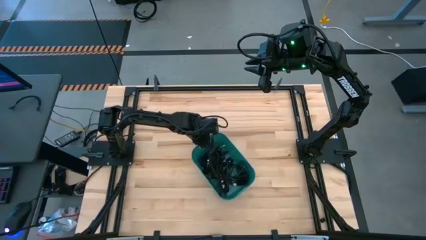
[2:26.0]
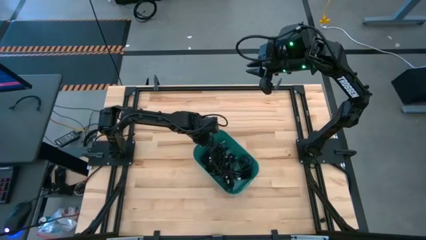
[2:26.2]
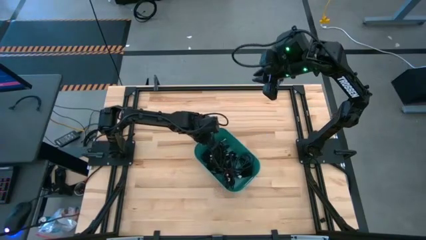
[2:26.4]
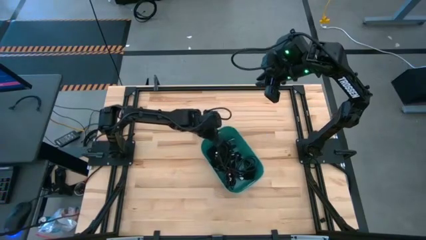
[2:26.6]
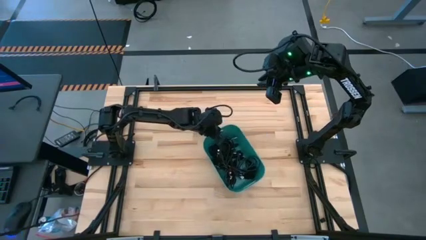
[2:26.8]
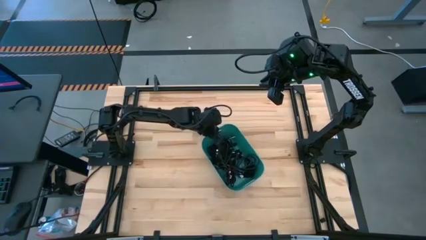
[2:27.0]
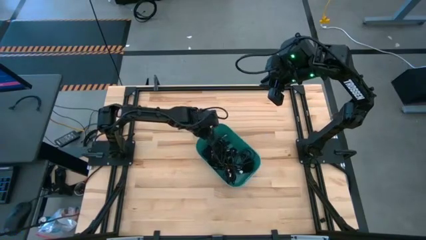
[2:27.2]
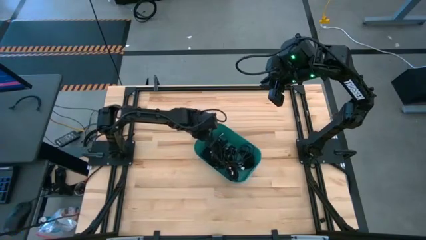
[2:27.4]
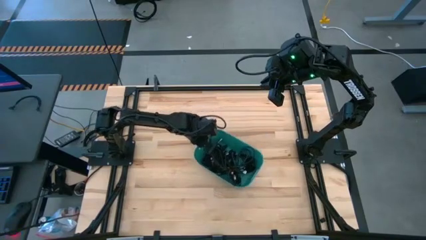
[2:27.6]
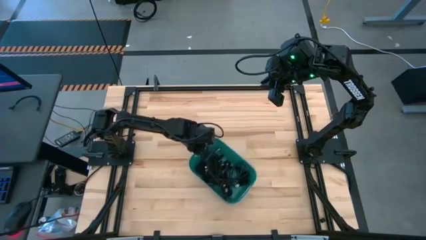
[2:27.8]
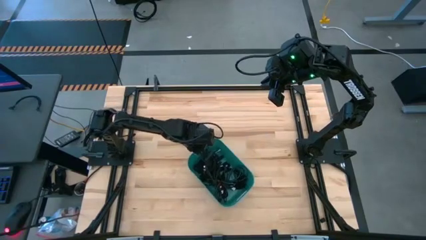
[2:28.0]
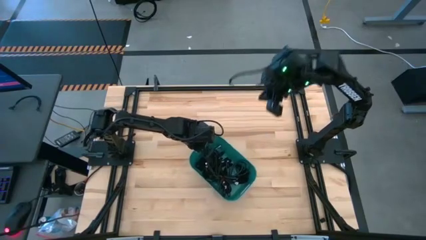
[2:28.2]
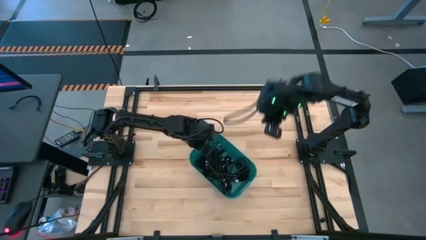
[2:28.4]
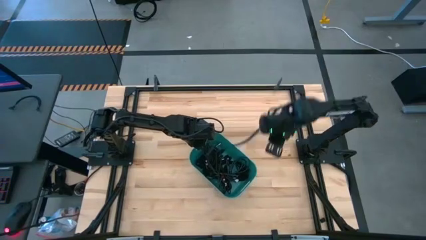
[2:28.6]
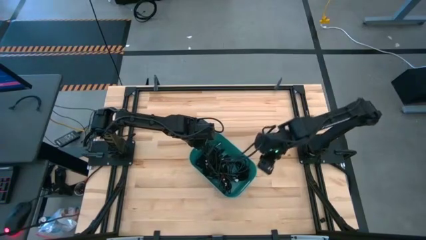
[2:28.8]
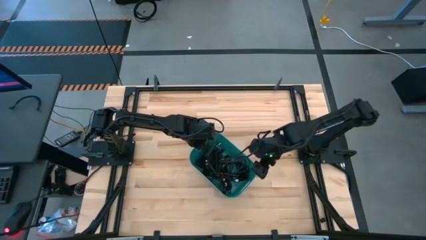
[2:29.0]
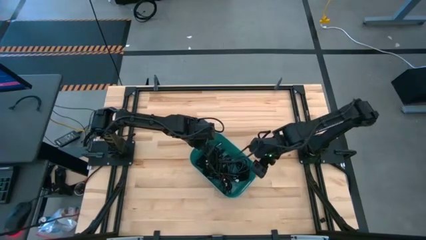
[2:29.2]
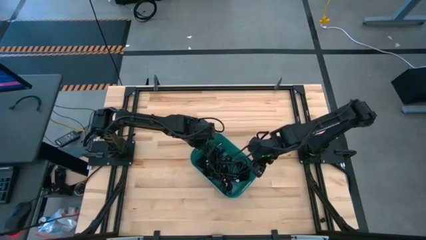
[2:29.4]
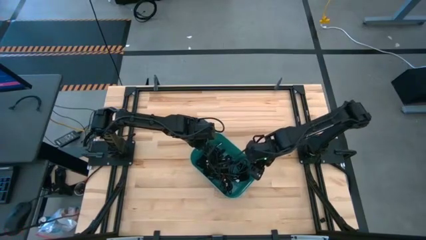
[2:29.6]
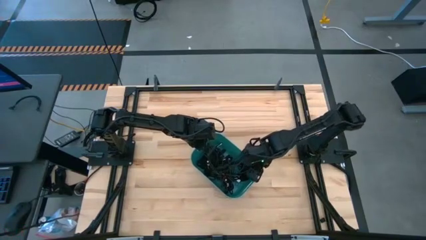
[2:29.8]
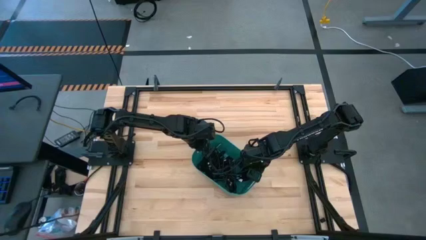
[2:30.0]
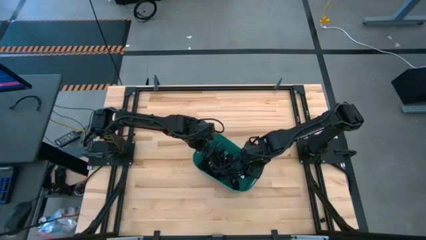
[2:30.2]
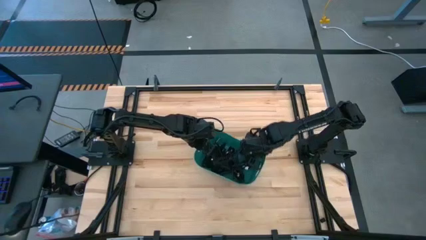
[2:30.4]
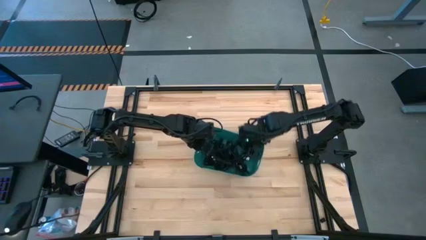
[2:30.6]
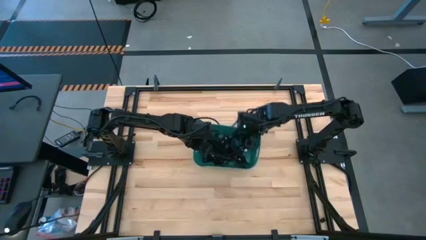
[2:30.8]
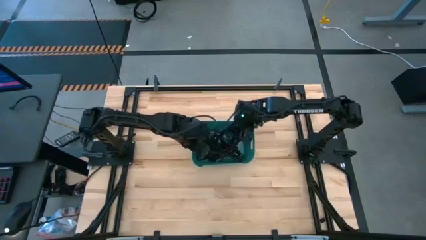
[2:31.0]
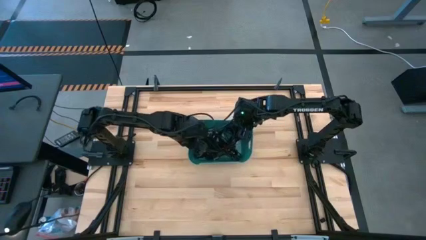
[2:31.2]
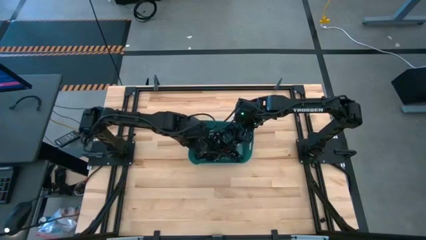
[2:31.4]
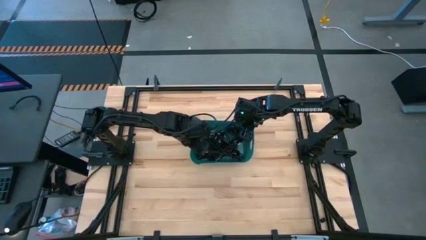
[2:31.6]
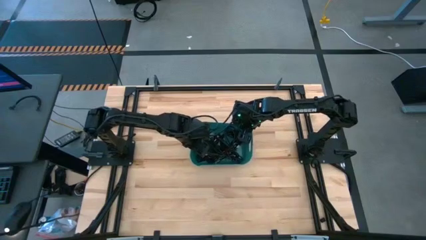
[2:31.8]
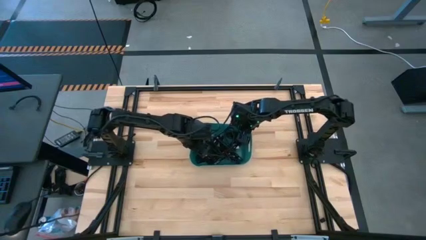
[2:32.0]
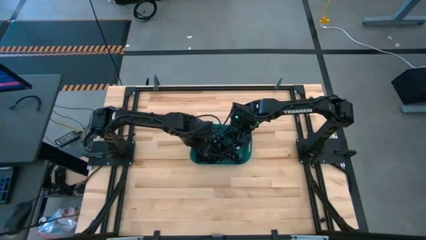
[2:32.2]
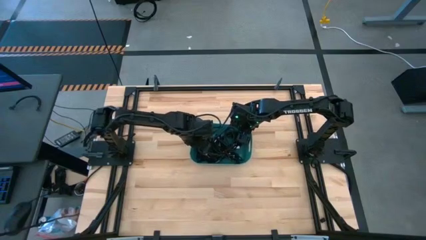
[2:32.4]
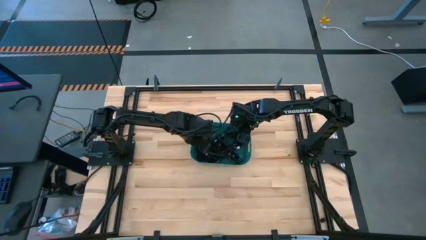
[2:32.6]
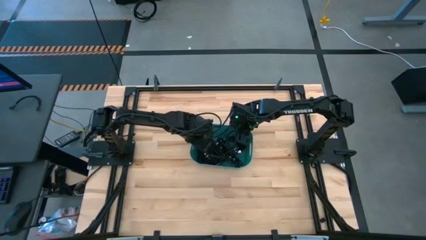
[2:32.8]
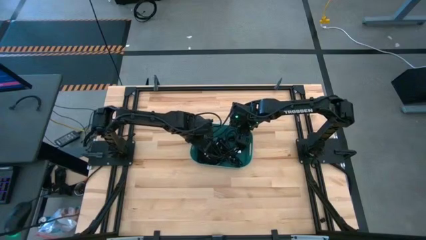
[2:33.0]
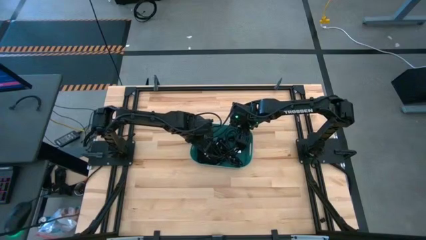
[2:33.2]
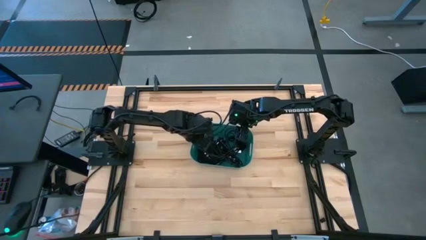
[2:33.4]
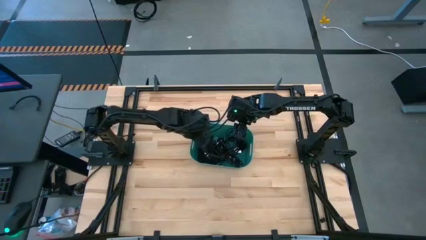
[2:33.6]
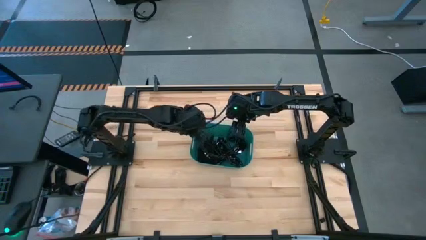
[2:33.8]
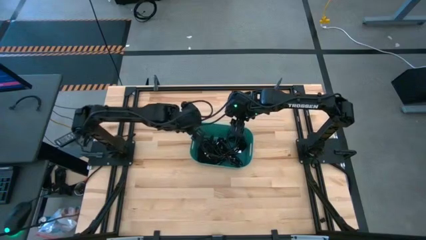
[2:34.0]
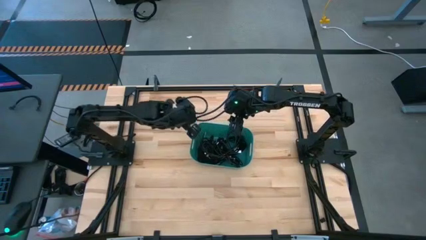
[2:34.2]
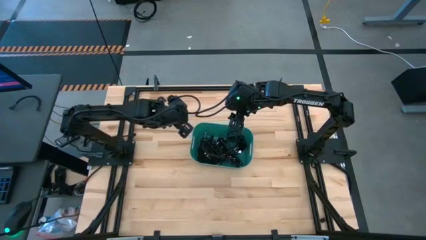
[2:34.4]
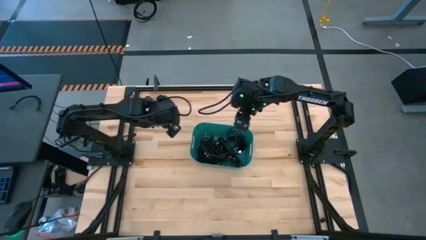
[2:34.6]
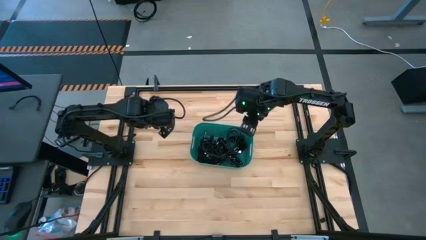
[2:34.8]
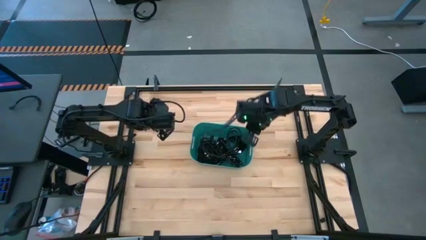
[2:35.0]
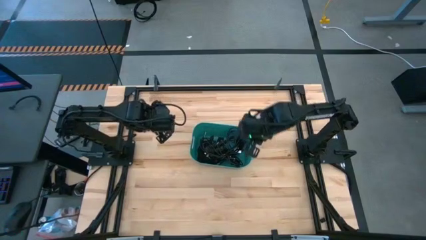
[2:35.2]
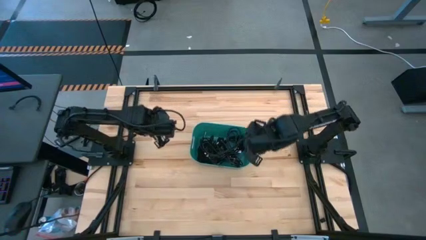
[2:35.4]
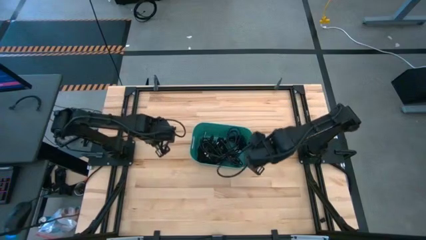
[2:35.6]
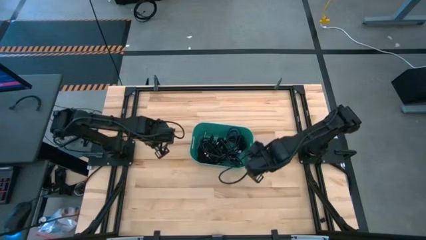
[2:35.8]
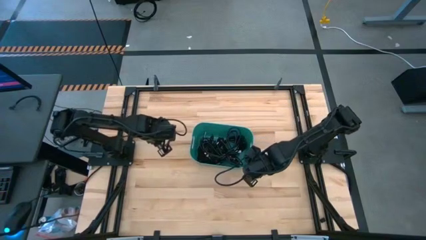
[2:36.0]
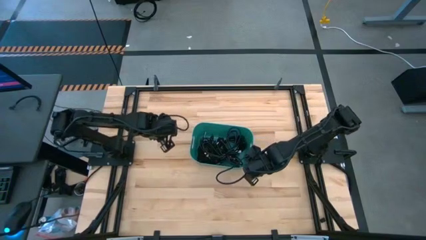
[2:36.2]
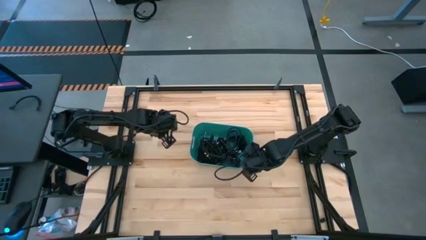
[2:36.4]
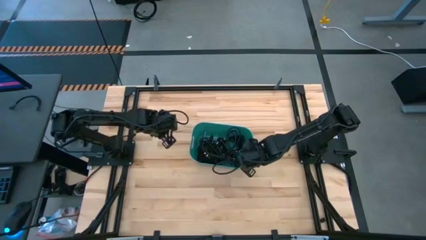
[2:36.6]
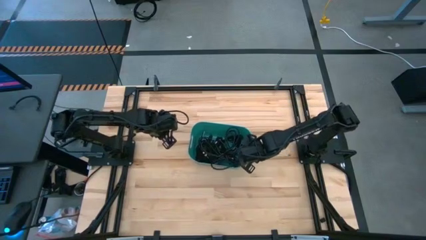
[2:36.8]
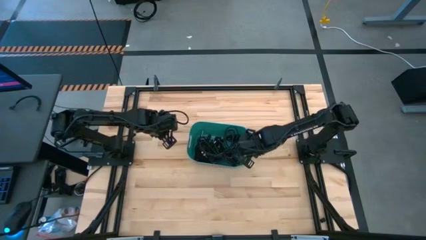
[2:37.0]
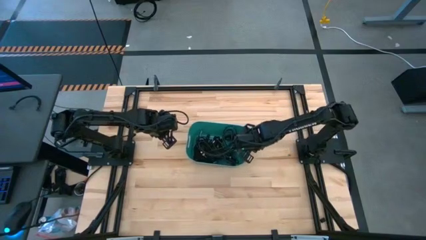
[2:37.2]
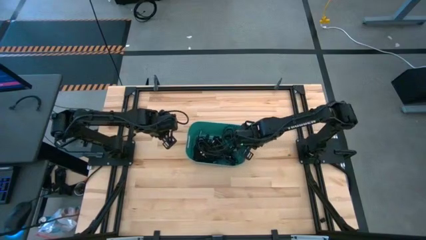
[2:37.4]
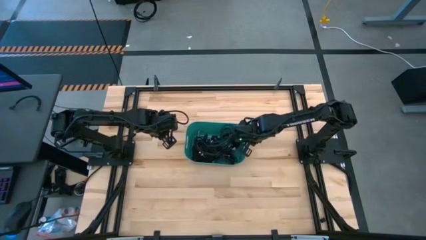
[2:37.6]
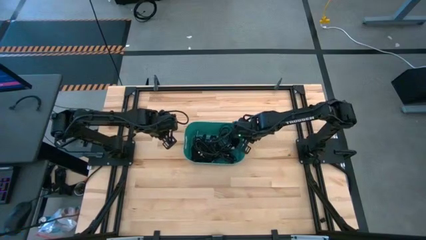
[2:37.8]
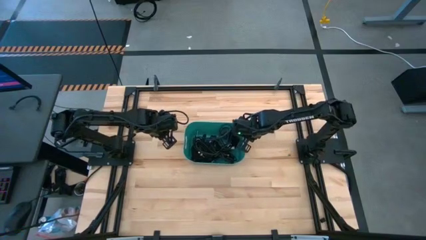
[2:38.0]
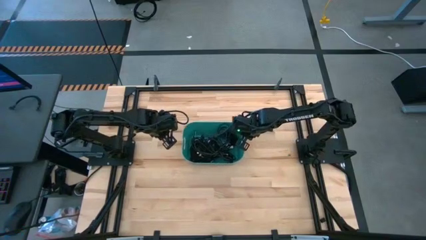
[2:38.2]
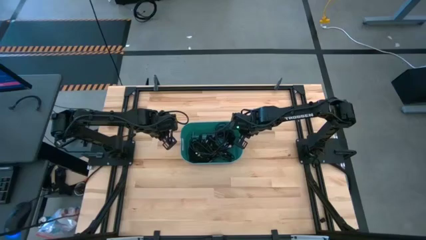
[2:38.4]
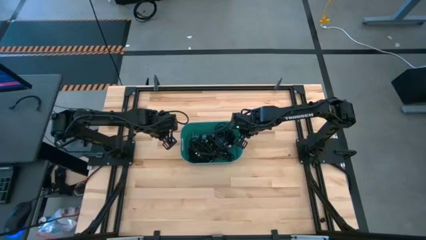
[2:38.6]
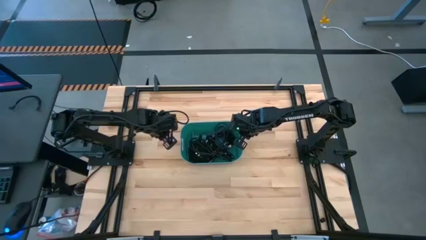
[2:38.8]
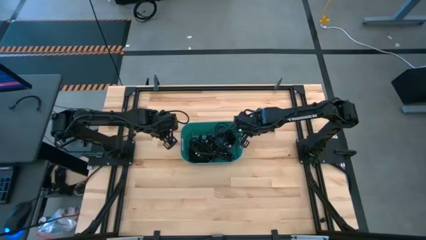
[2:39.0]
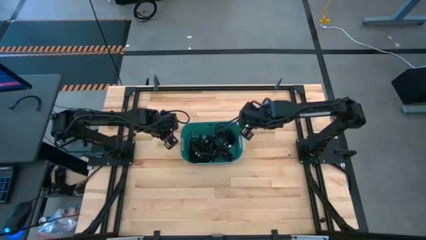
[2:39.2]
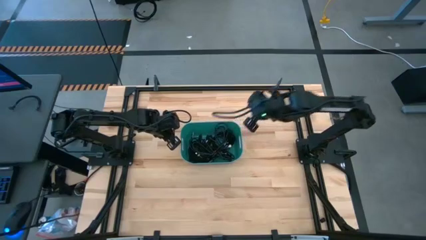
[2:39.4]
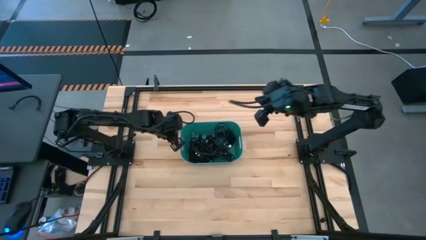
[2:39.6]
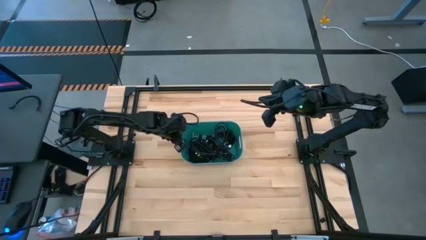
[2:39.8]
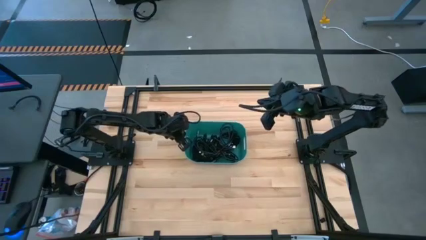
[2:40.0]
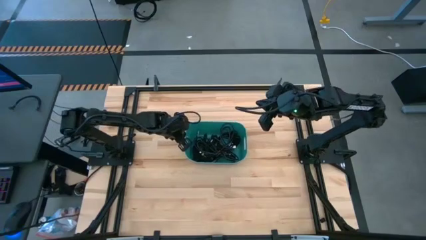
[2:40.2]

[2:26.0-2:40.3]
Task: Pick and place USB-C Cables
Adjust the green bin

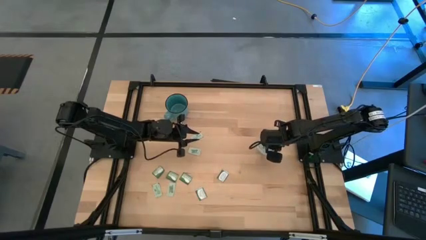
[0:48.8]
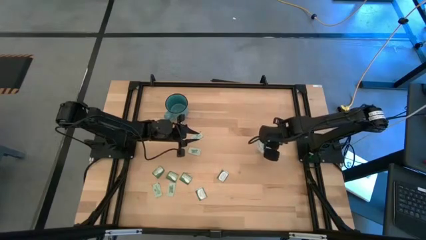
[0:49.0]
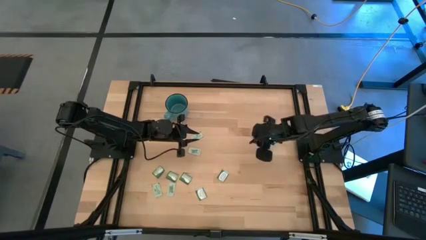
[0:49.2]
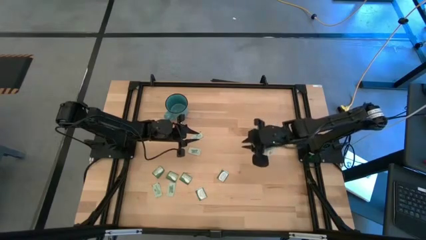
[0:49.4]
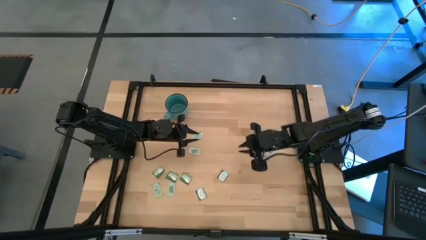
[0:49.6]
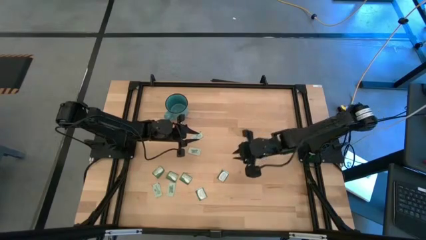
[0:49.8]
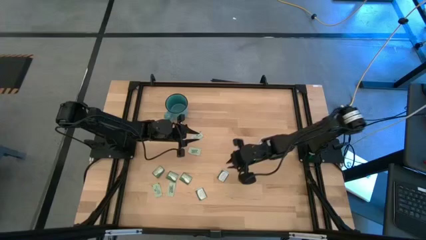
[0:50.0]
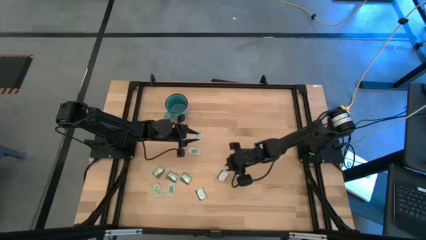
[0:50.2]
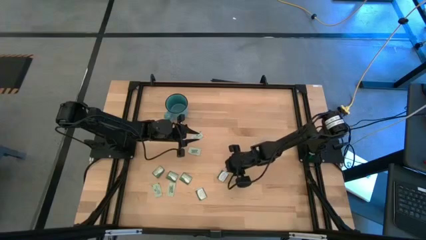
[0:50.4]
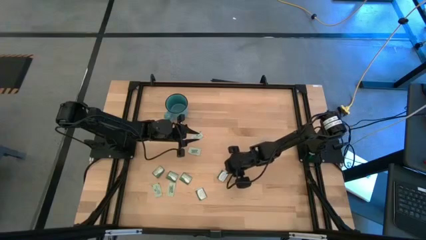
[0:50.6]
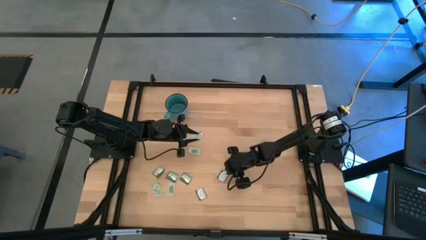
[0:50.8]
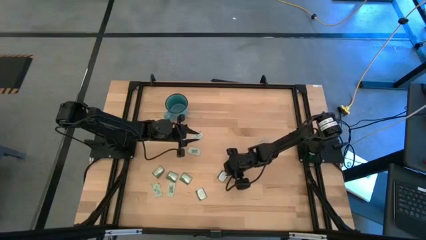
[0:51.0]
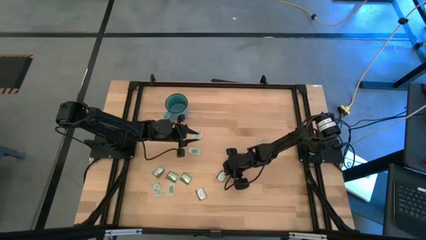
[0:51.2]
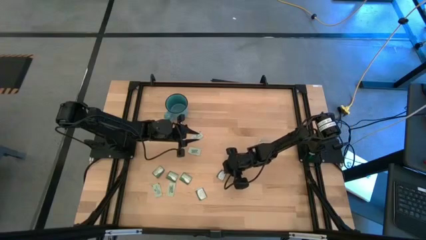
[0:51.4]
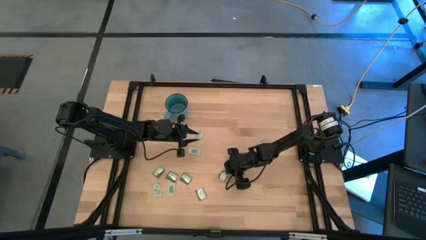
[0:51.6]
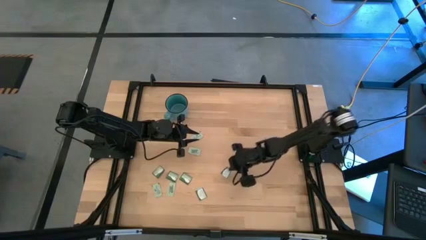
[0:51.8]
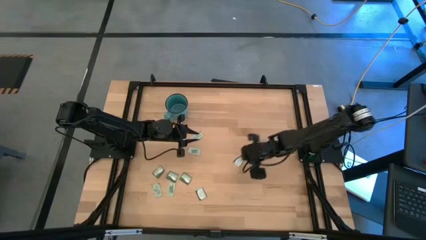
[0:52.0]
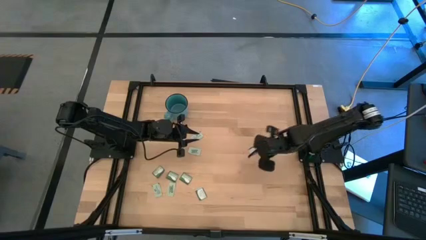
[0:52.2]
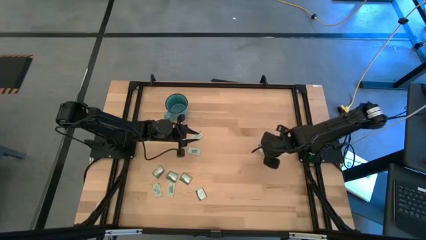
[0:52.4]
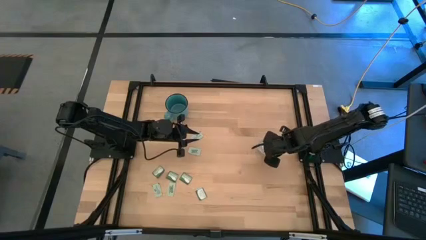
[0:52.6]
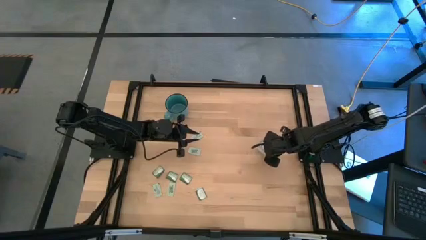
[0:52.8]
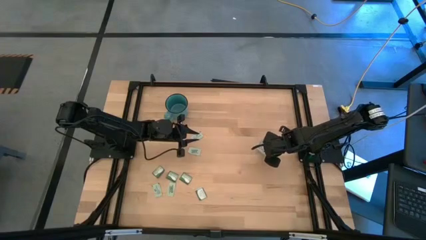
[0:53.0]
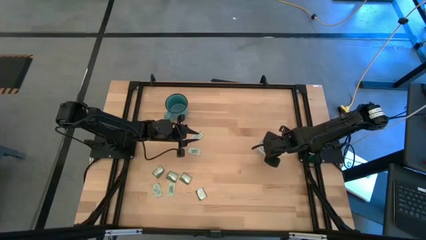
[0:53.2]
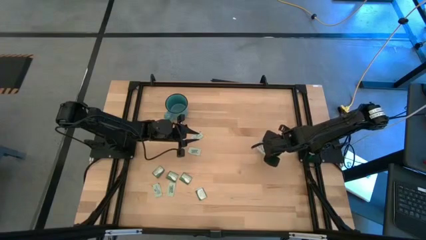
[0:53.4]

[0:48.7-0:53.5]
Task: Pick and place Stevia / Truvia into bins
Put the truvia packet into the transparent bin
